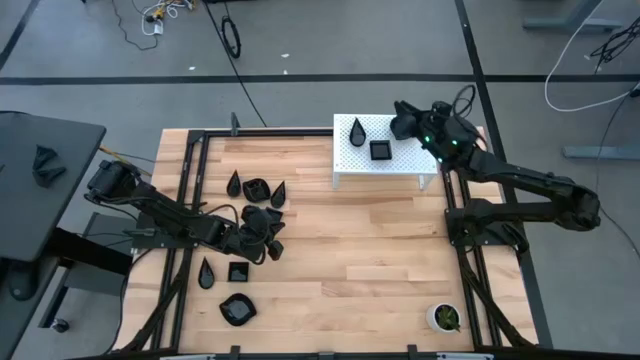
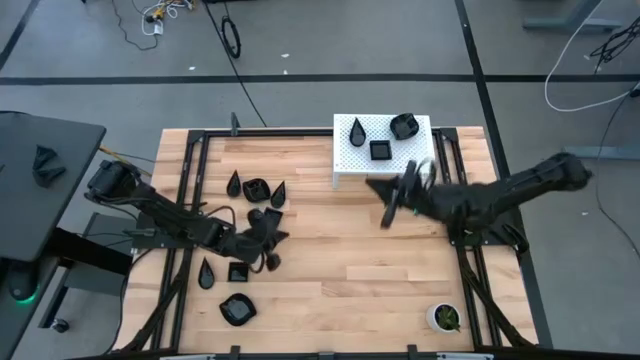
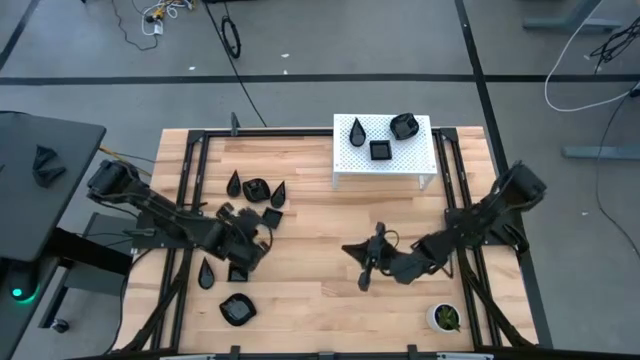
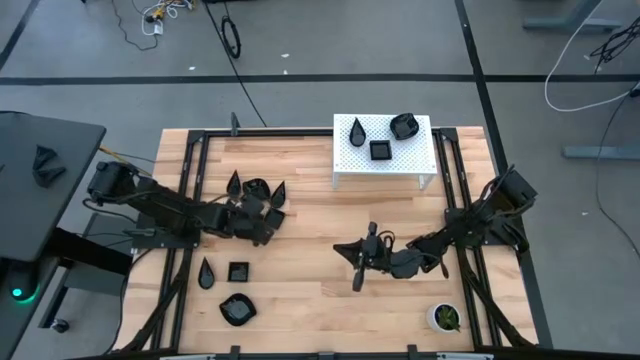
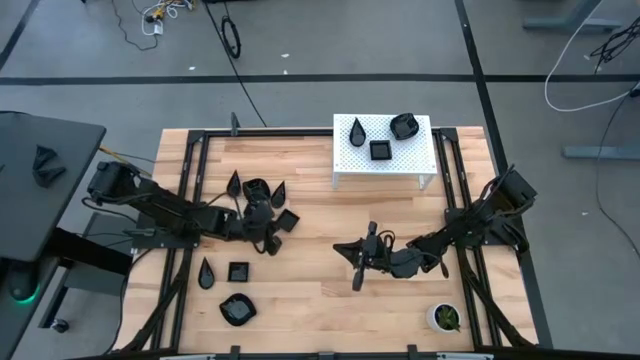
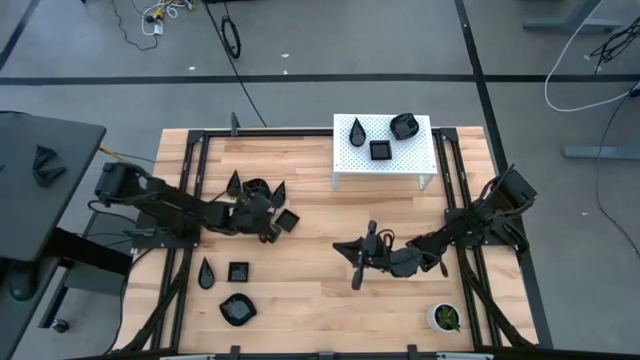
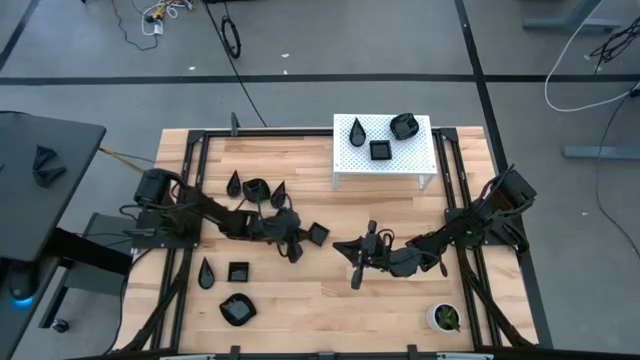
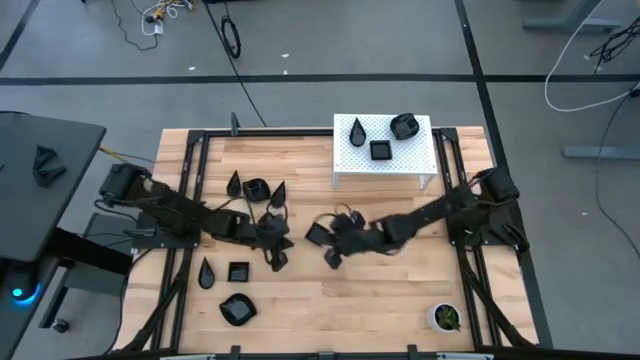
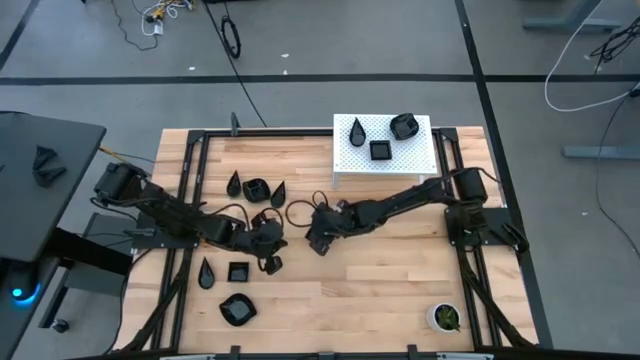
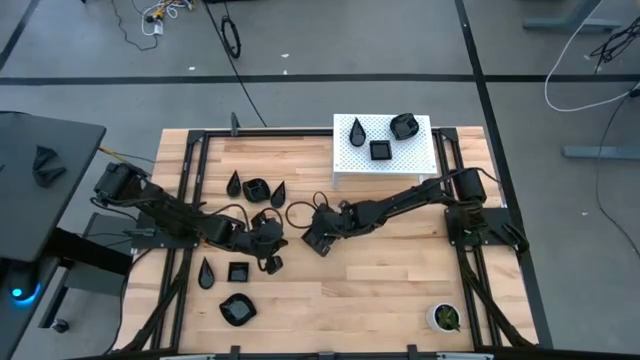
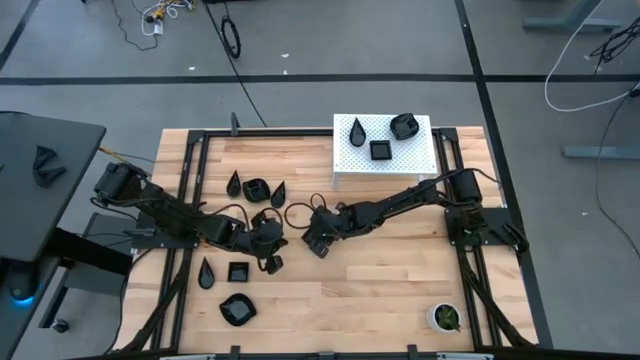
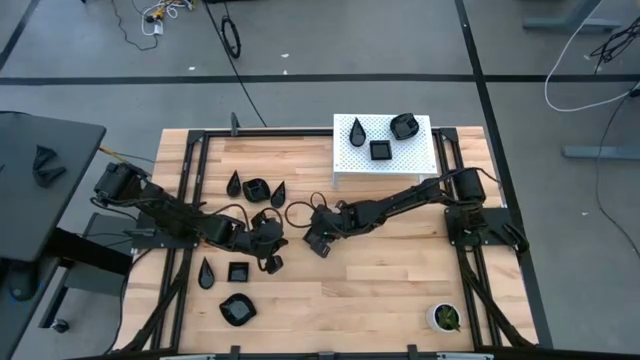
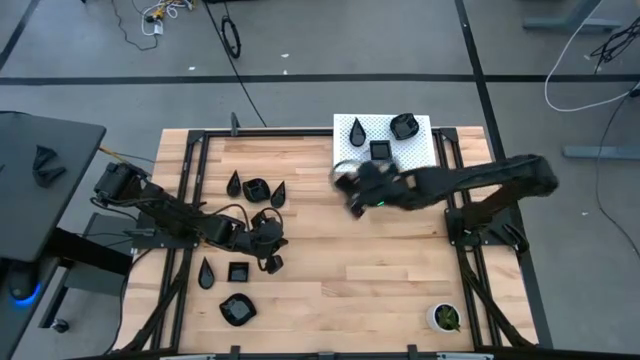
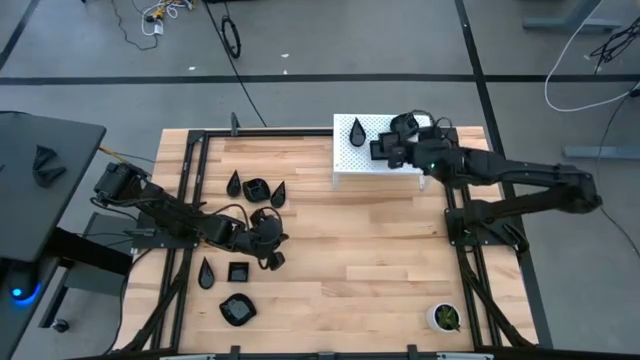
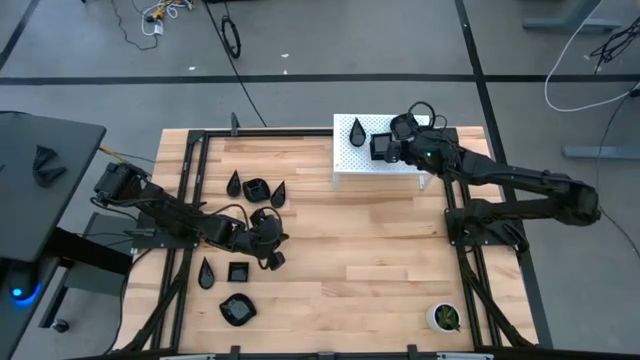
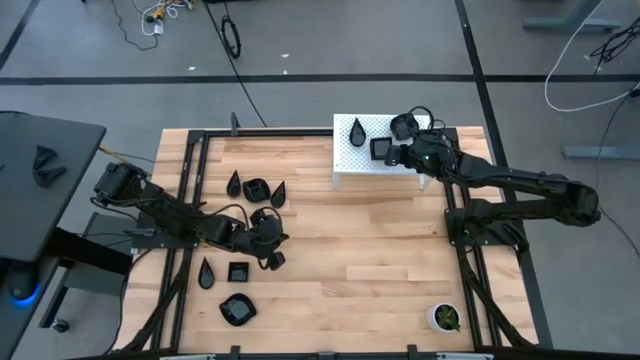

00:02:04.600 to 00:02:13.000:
Task: Pick & Place Mini shaped plates
Stack the black square plate on the black square plate on the shelf

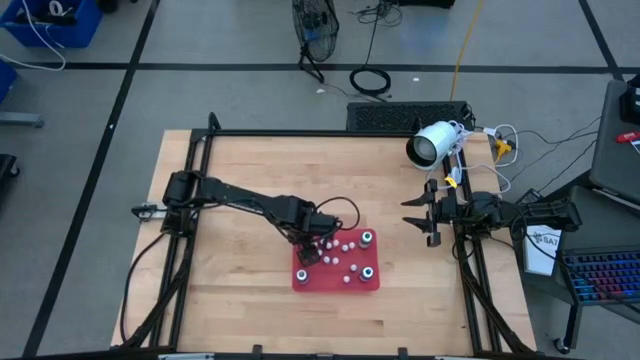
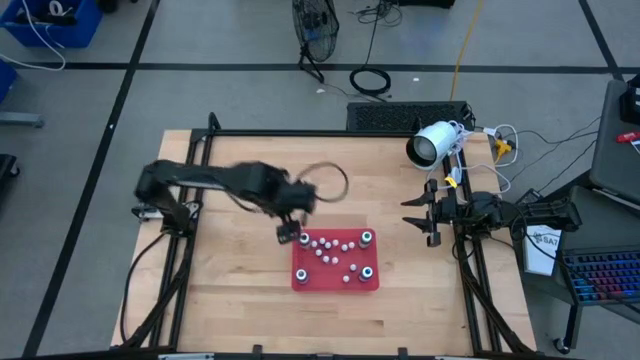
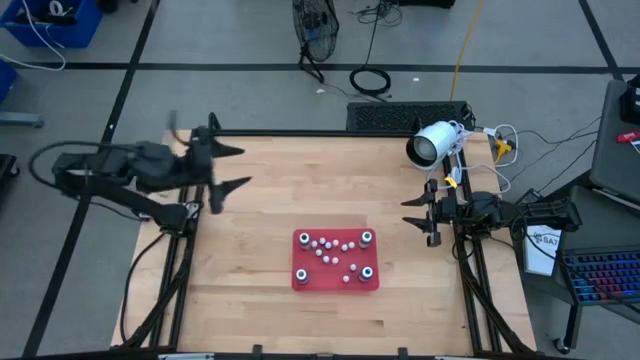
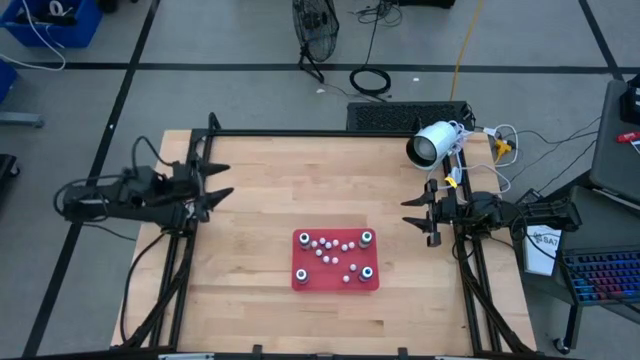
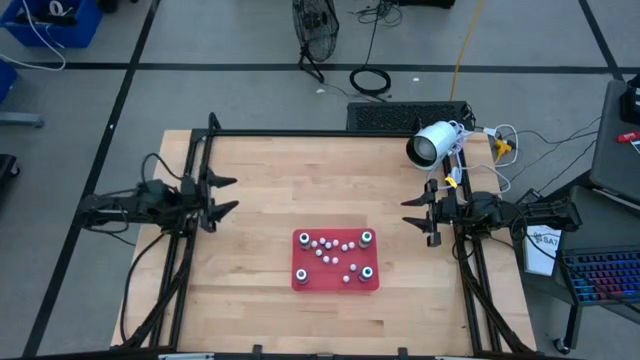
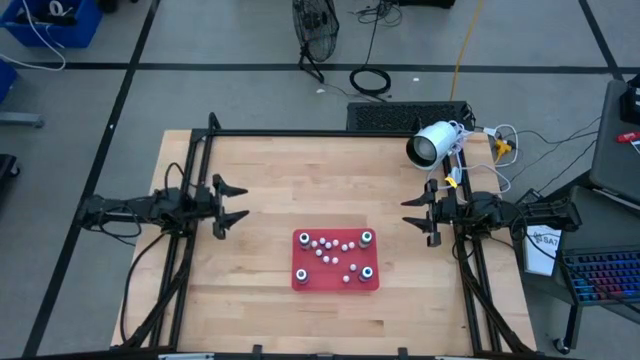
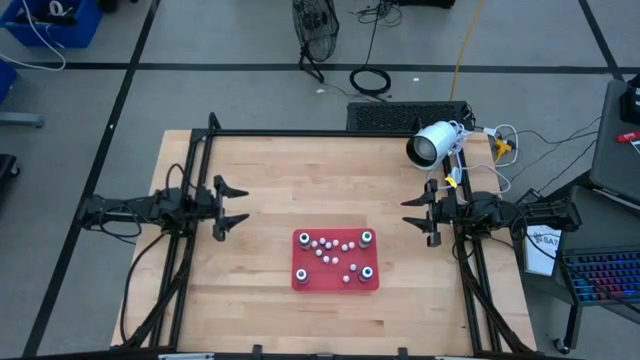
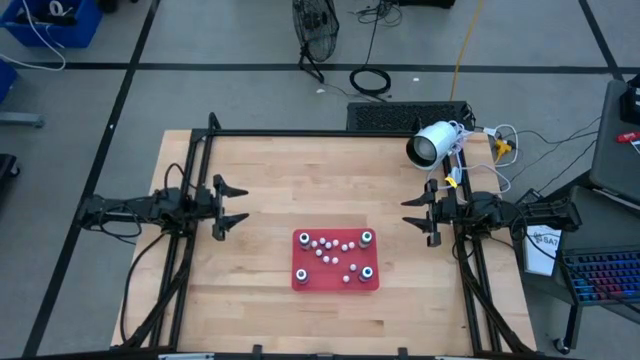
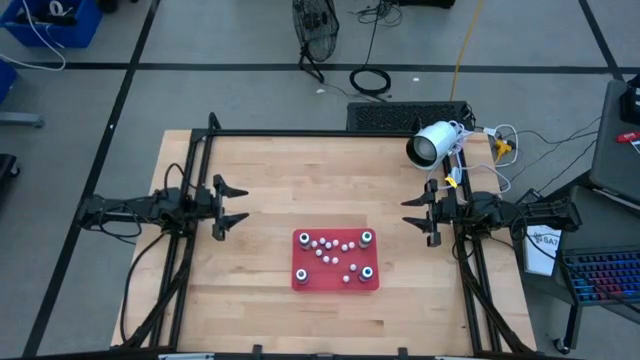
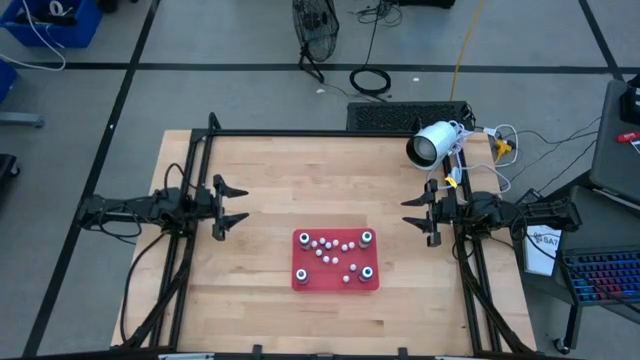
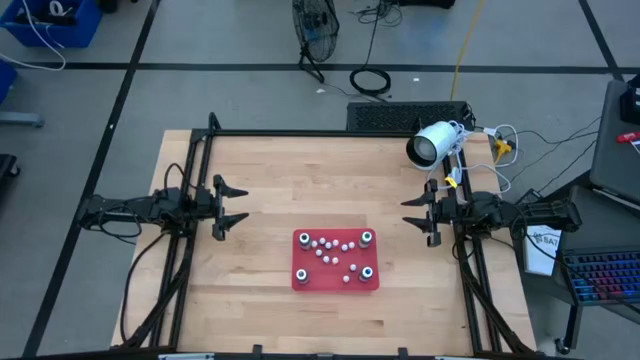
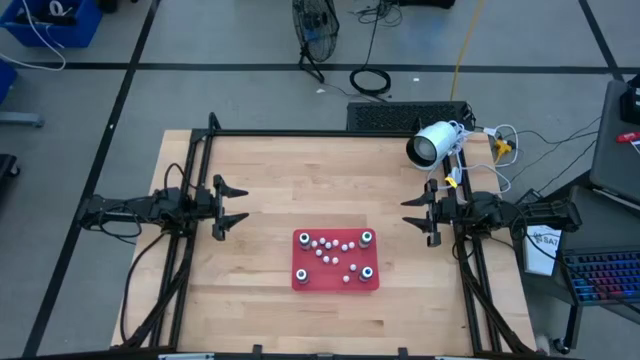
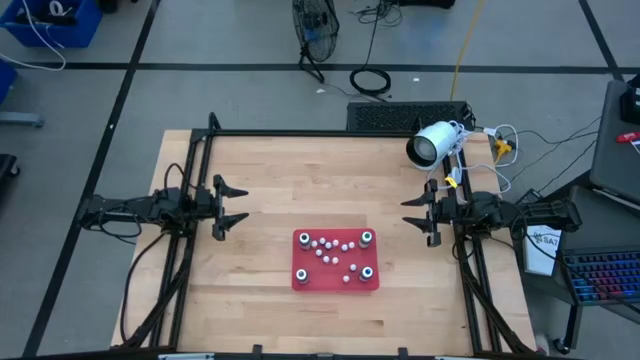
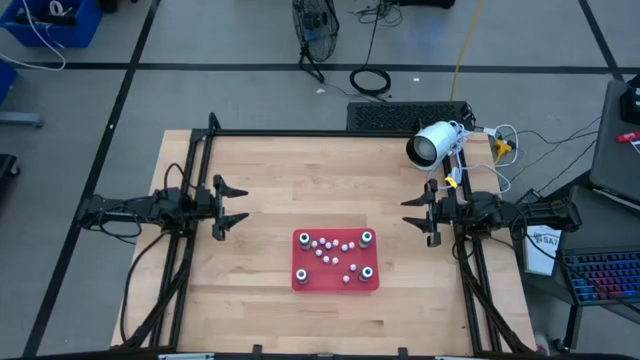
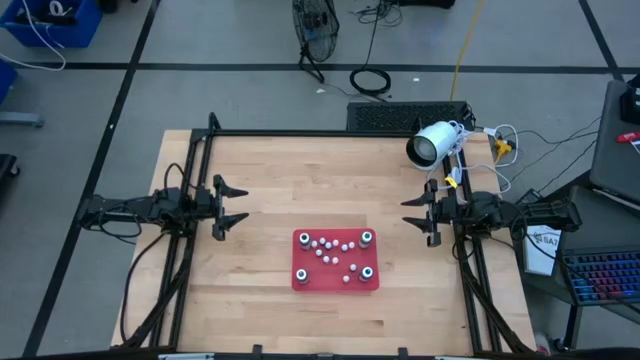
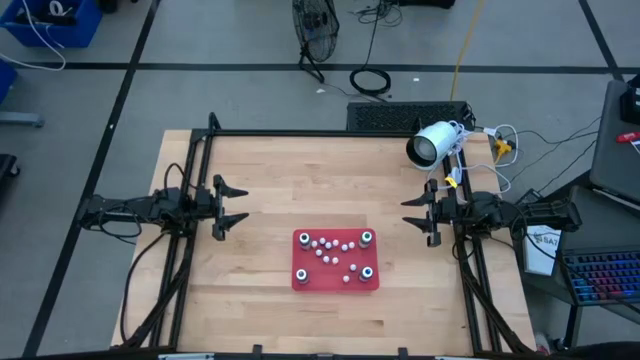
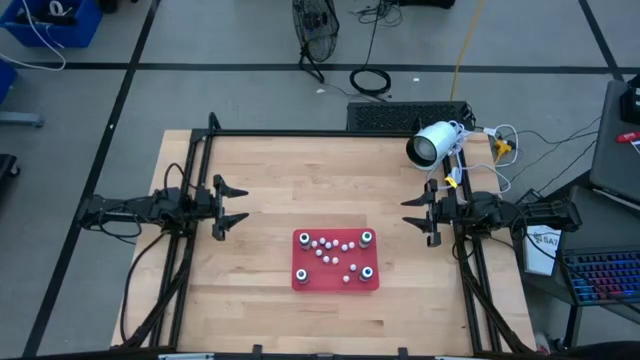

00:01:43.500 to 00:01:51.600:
Task: Pick & Place food coloring
Return to Home Position
